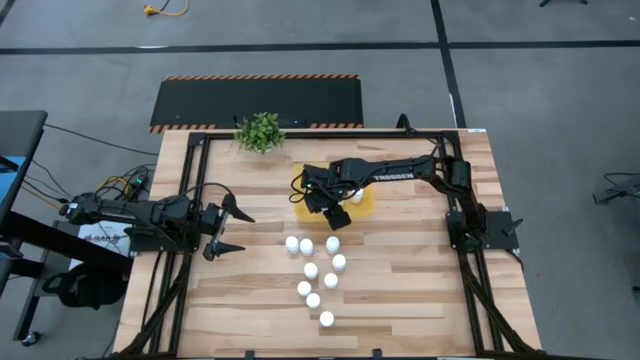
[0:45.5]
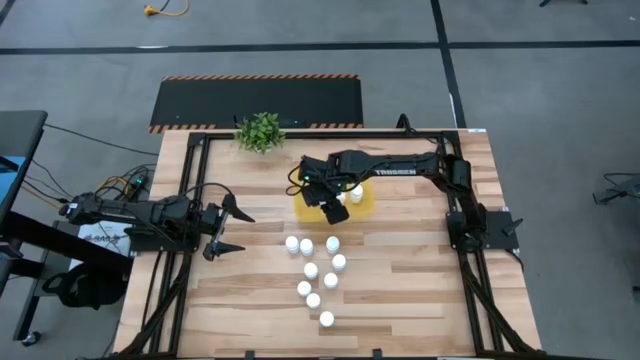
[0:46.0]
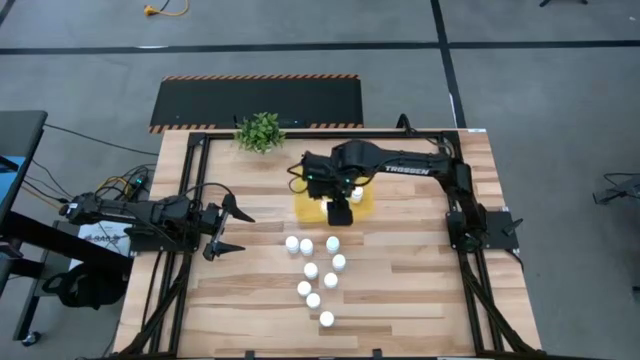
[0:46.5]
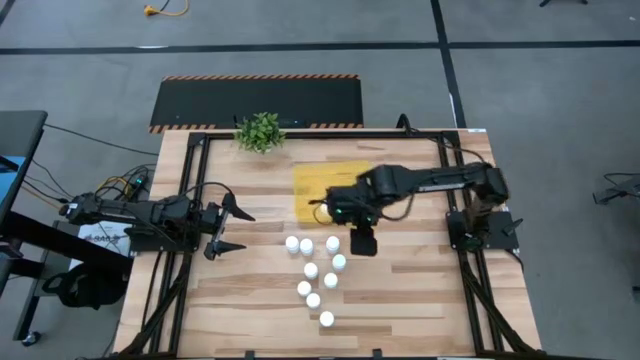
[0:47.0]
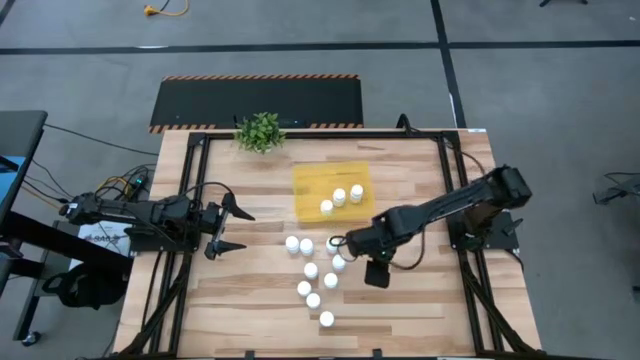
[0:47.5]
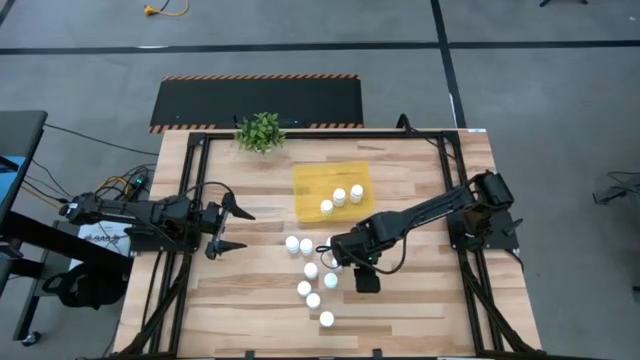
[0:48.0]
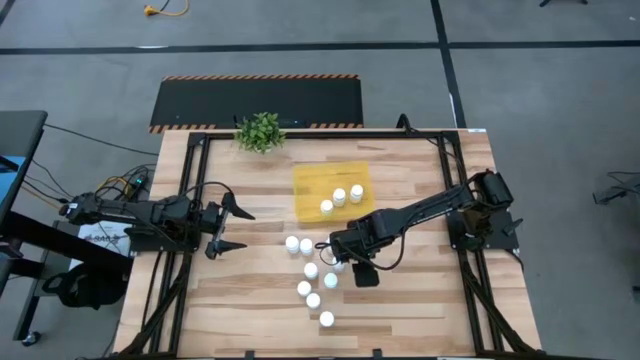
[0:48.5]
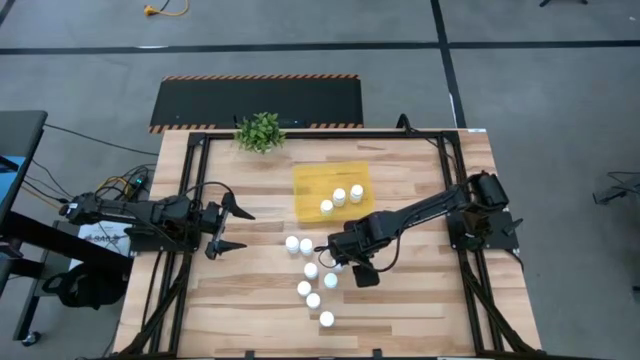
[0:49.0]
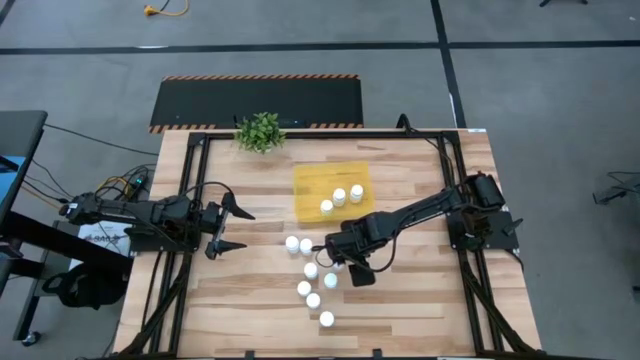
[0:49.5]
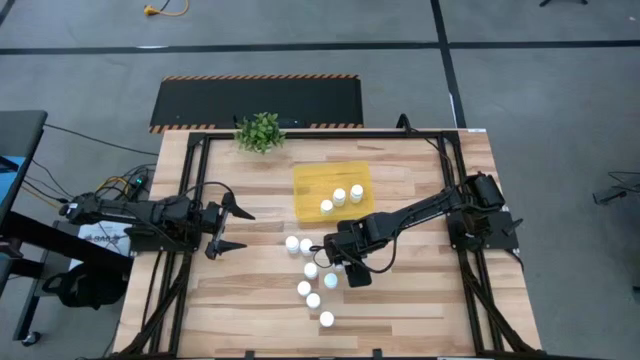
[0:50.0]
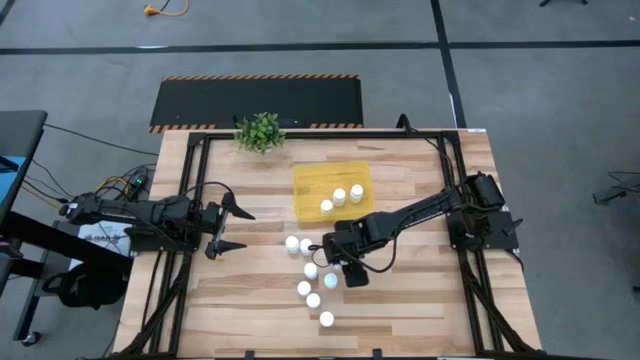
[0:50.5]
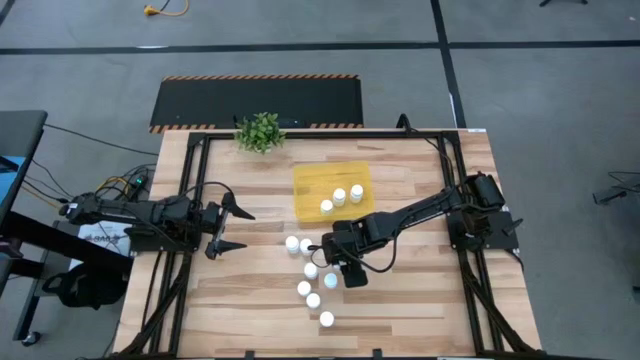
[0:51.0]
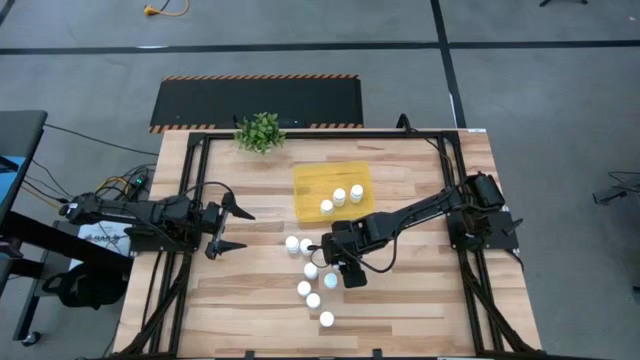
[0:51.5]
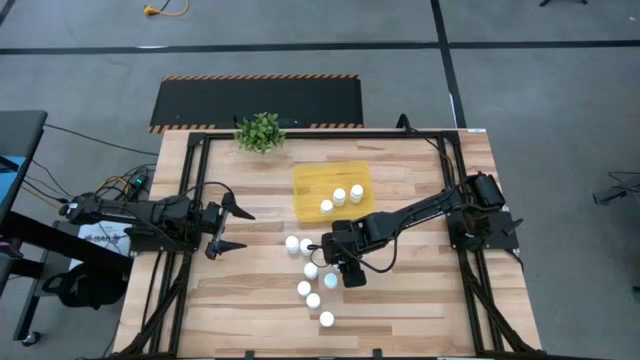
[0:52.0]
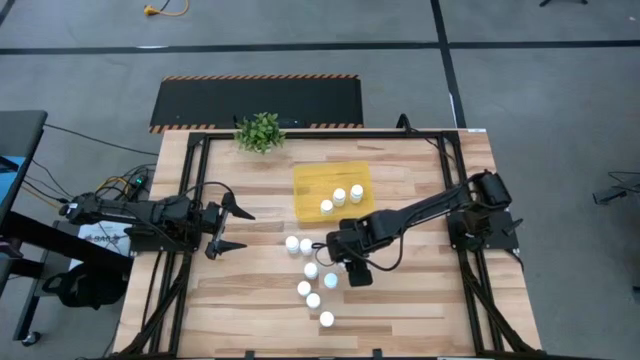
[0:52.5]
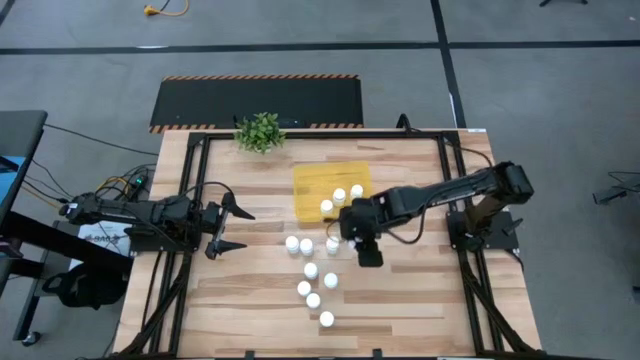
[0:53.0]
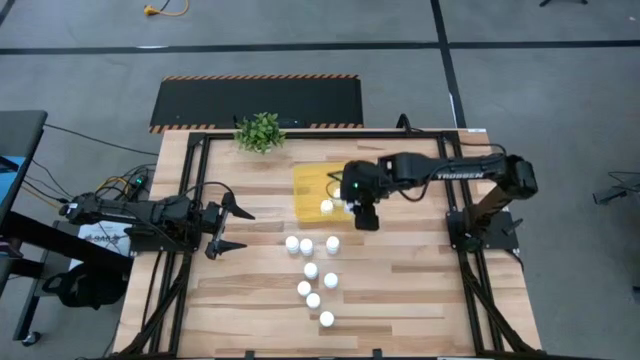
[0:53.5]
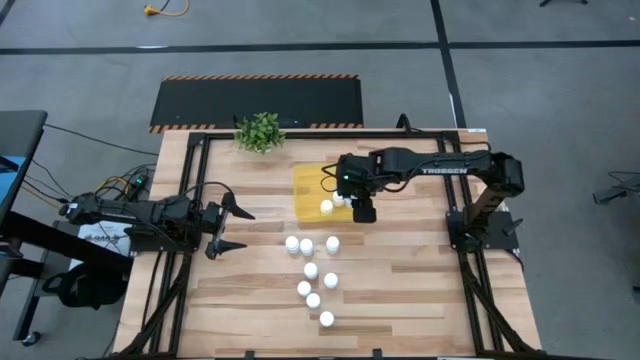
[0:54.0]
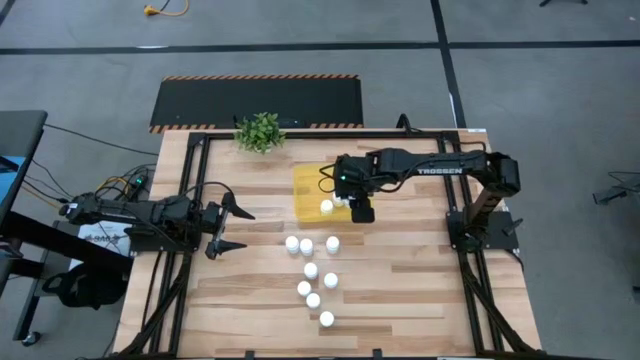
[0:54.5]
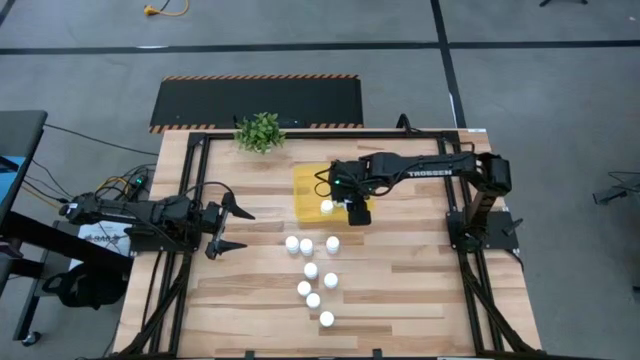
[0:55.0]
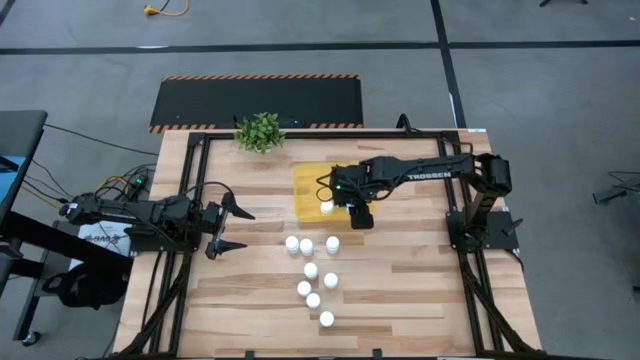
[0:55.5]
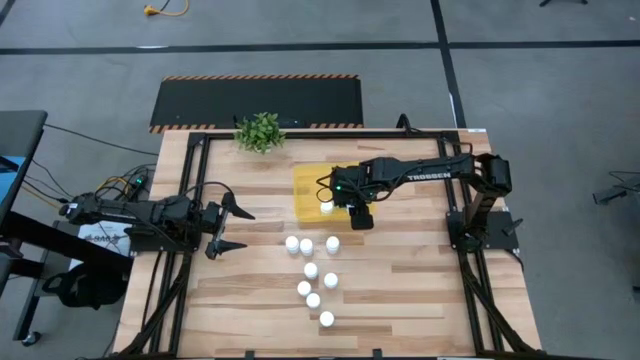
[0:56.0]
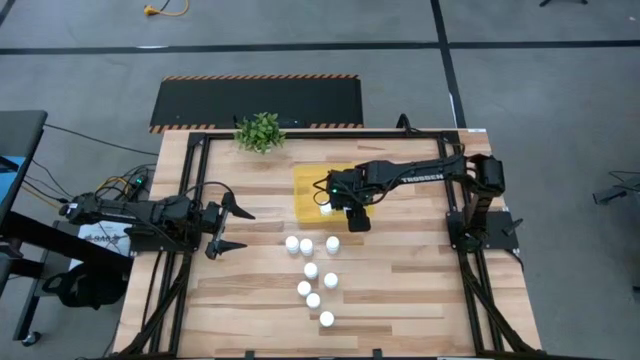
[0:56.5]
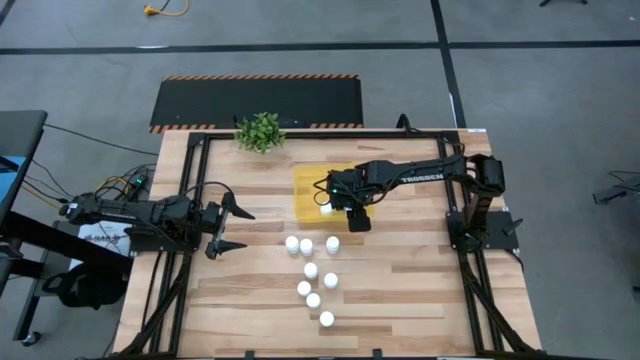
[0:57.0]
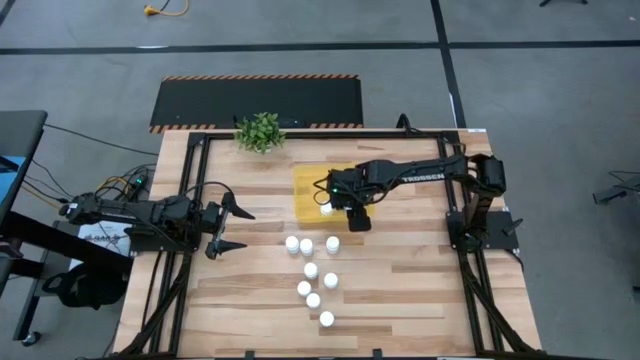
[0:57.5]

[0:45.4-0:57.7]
Task: Pick and place pill bottles into a basket
Put the white medicine bottle into the yellow bin

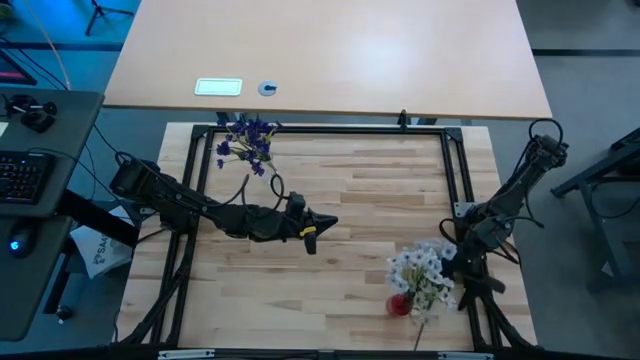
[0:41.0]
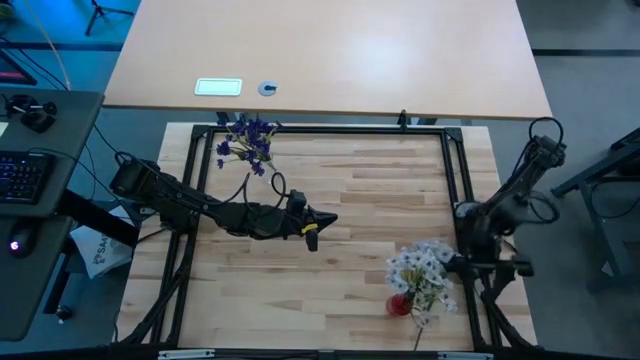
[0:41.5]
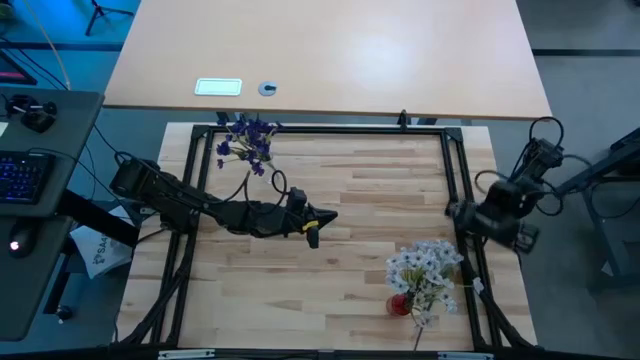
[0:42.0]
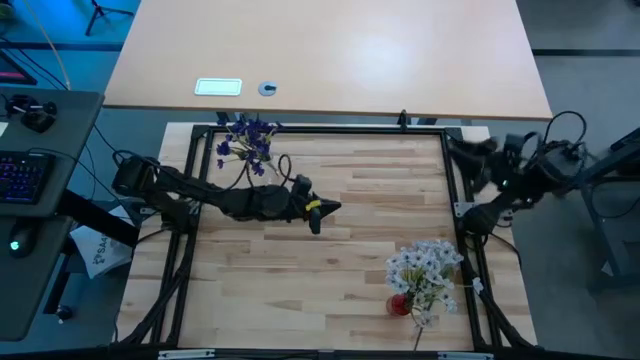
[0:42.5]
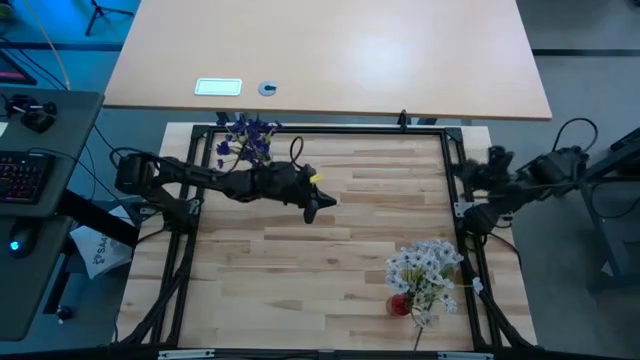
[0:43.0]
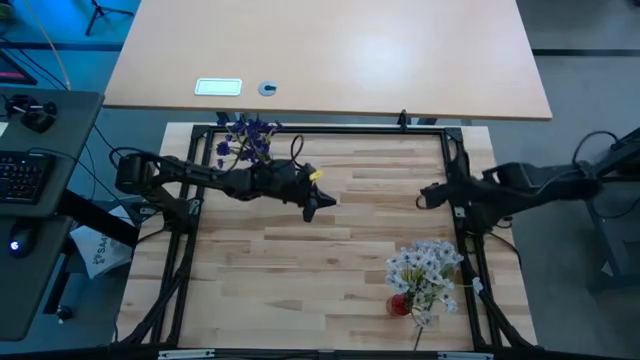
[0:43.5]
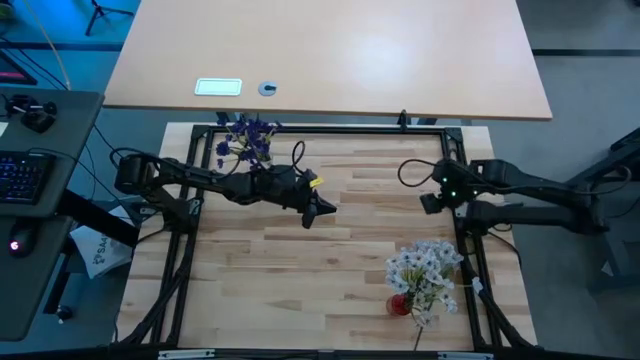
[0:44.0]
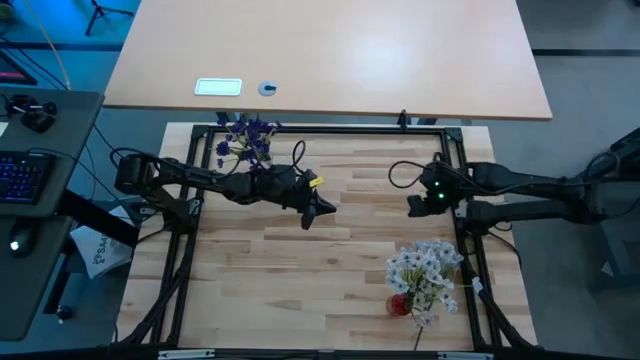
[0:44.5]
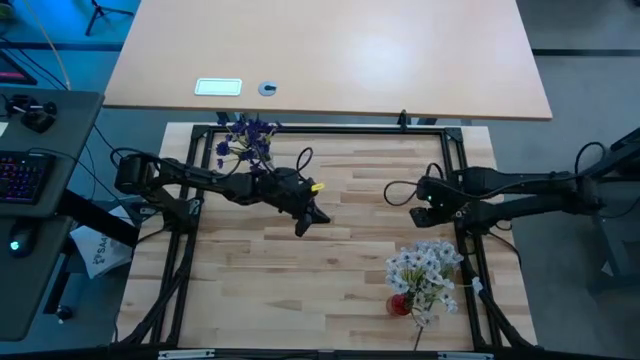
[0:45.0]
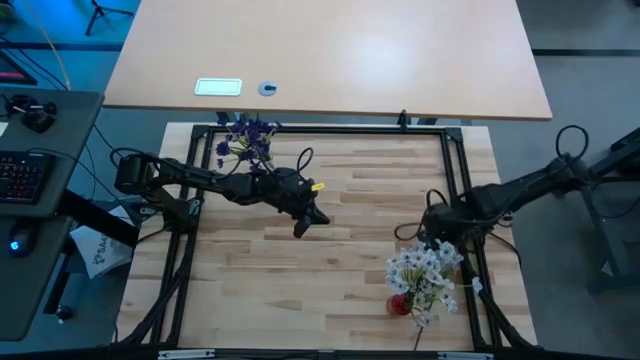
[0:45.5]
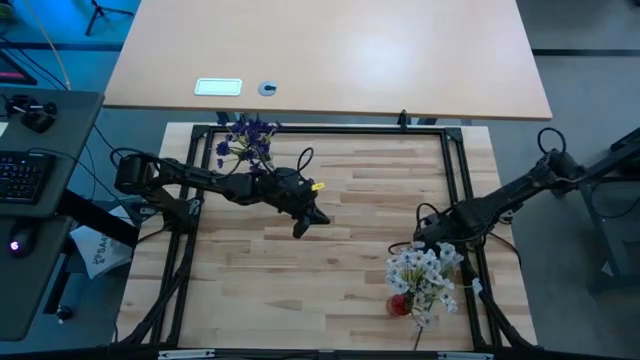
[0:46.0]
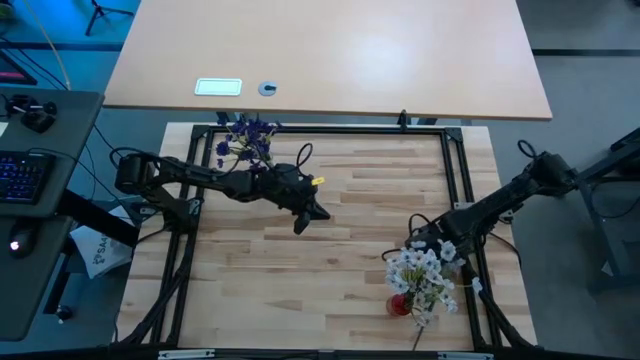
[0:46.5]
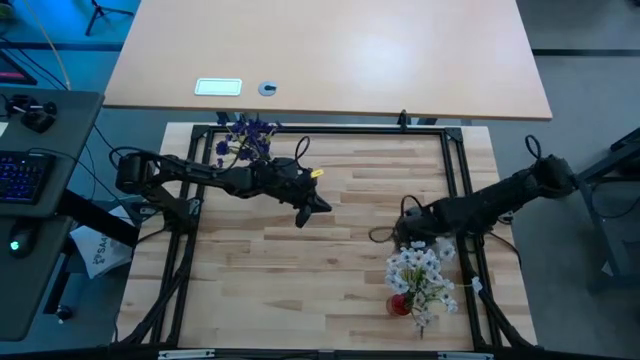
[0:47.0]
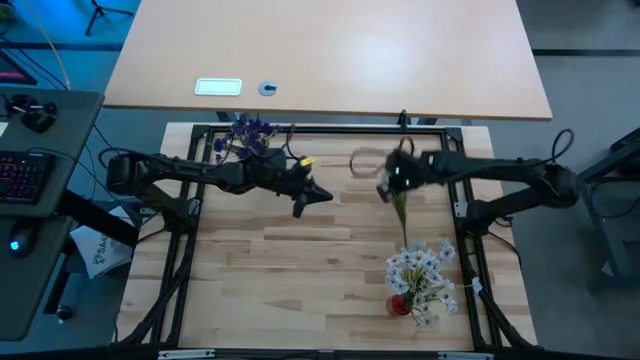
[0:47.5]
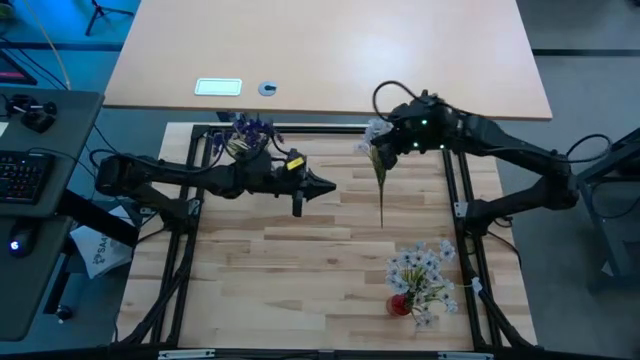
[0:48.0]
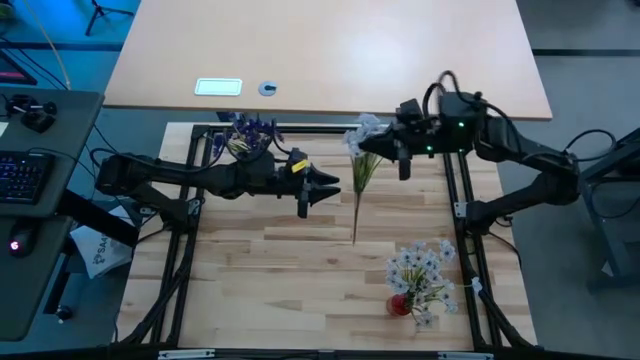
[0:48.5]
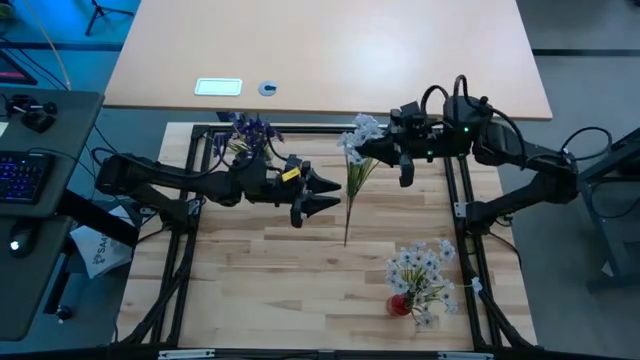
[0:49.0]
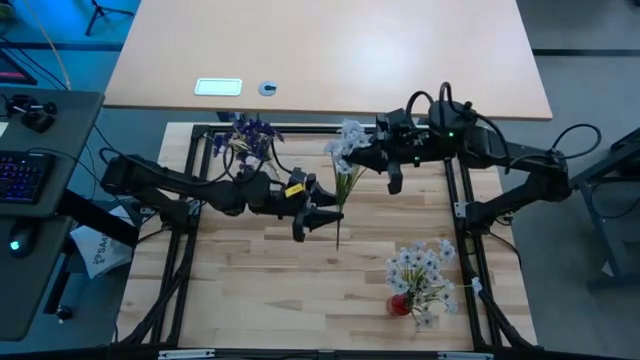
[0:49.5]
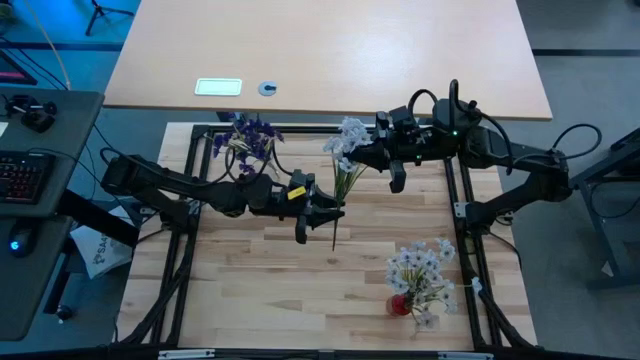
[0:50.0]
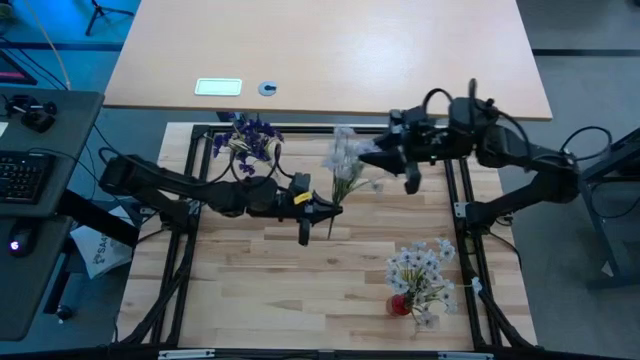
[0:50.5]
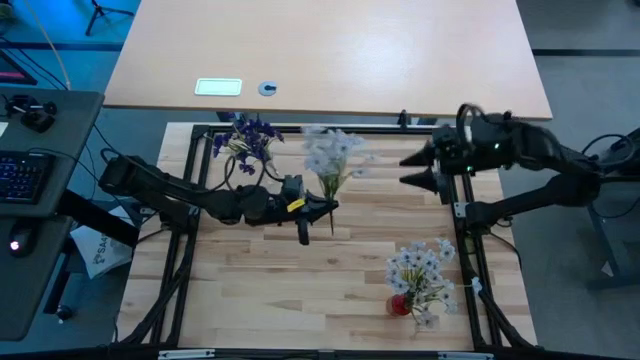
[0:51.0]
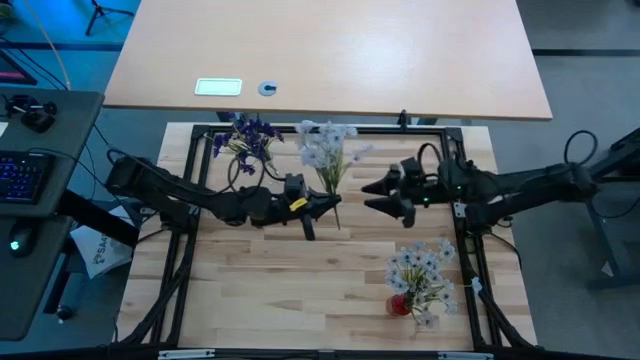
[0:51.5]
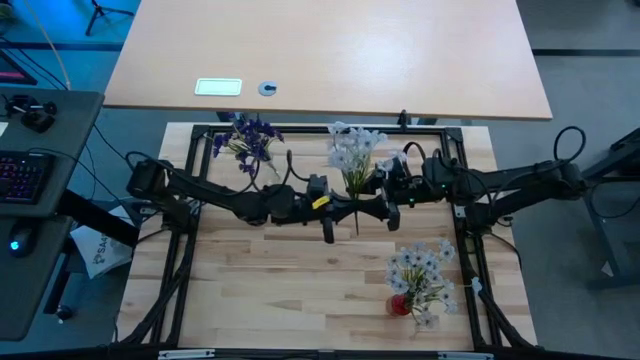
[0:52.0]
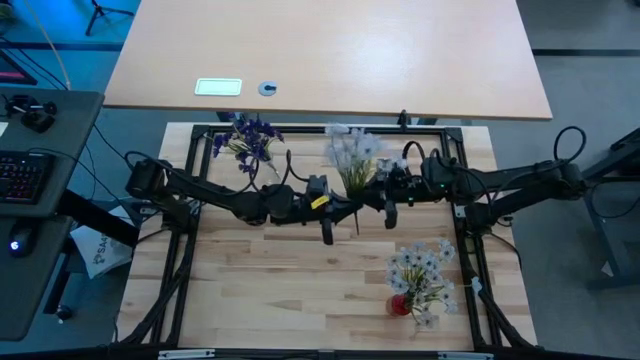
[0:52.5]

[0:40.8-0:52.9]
Task: Sort flowers into vase by color
Put the white flowers into the red vase
